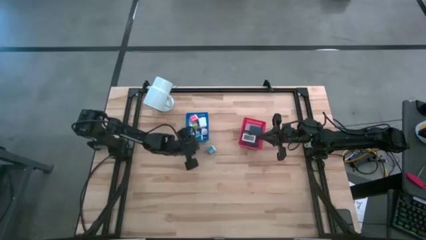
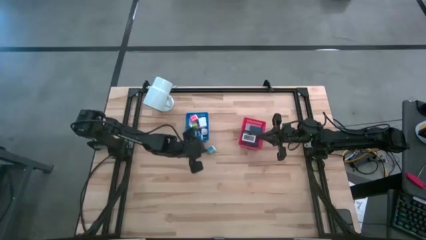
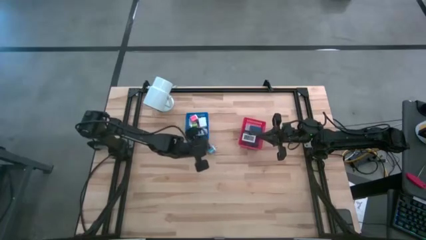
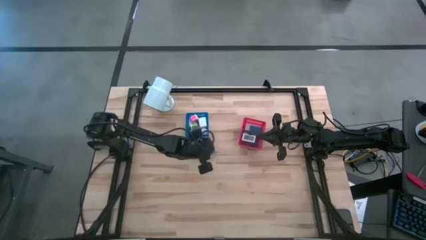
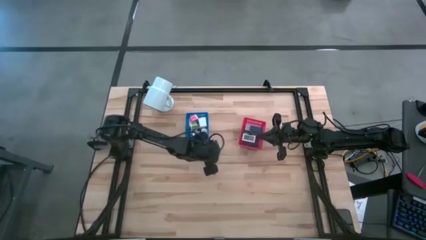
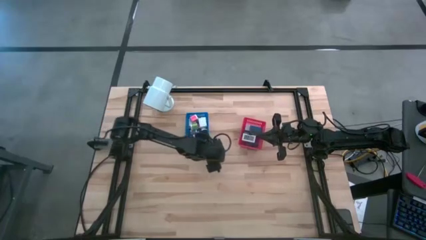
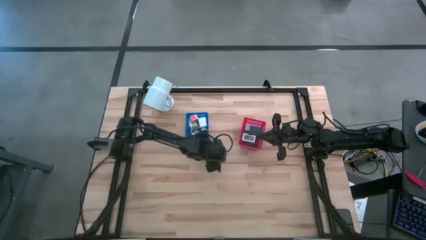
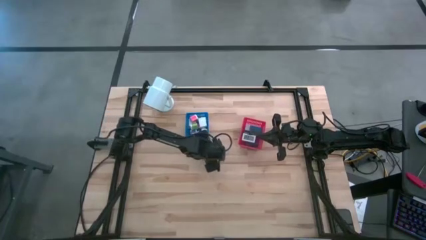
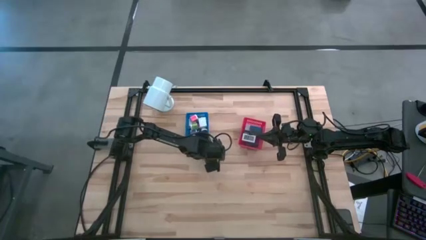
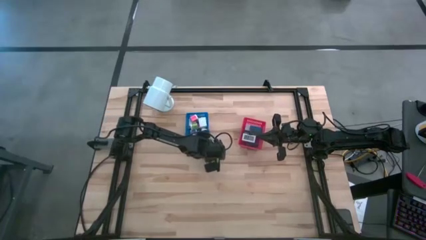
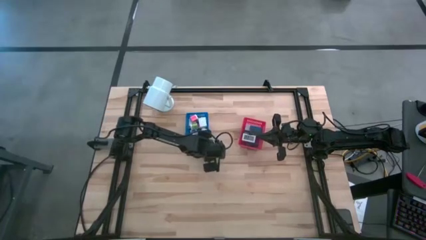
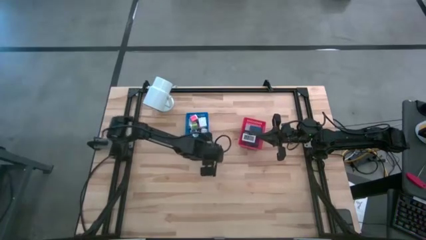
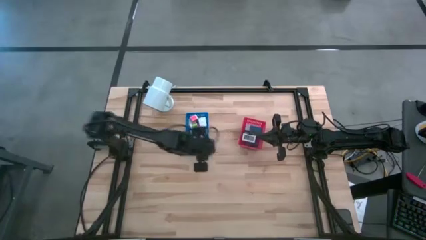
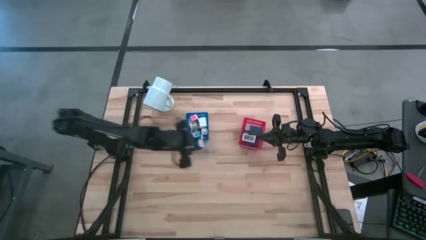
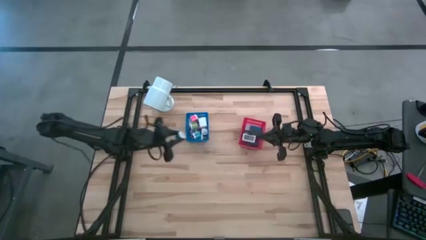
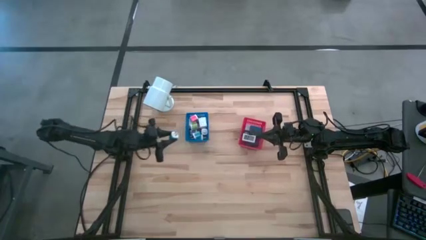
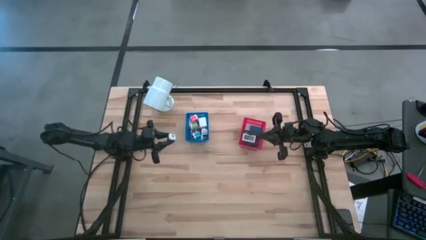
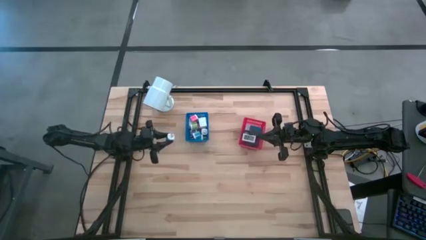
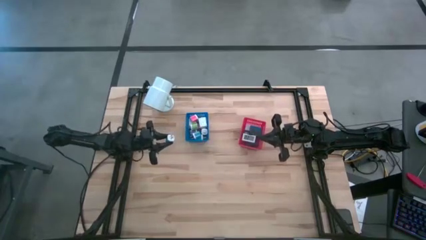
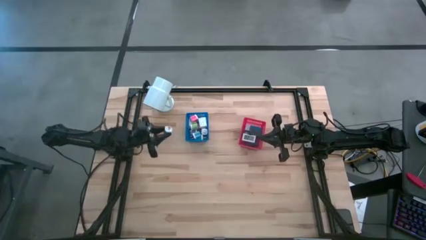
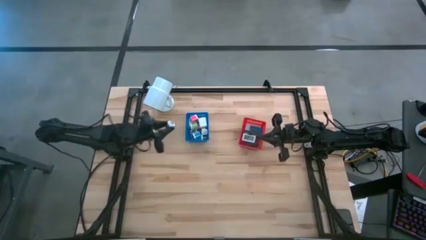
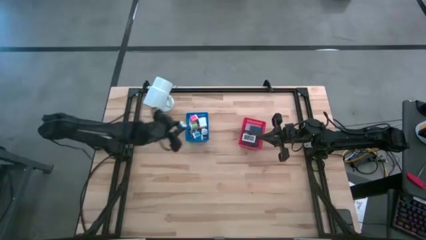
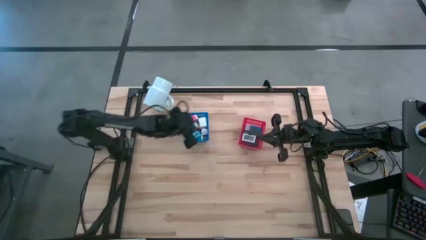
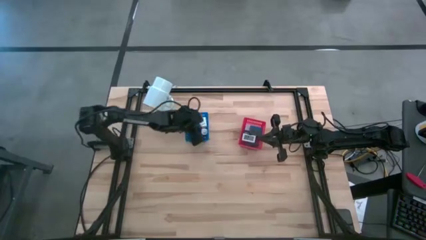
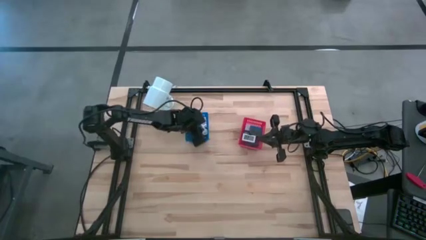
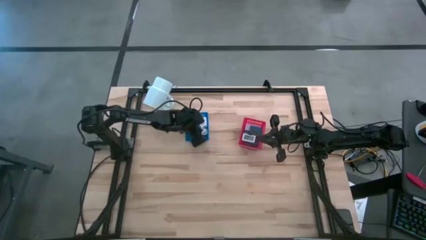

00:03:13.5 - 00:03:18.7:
Task: Pick & Place Office items
Put the blue charger adapter into the blue bin

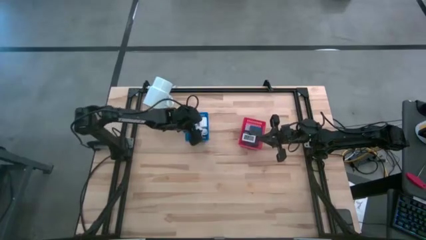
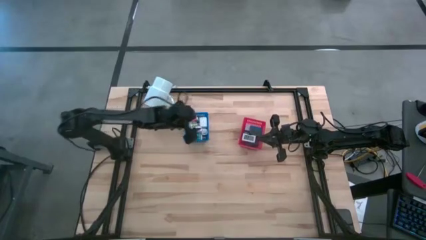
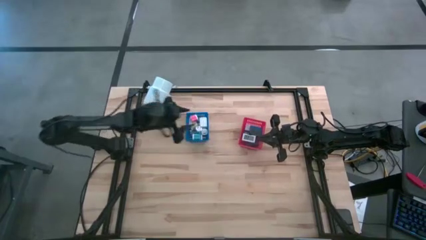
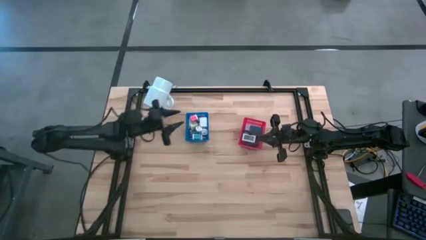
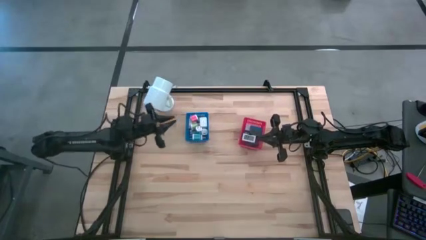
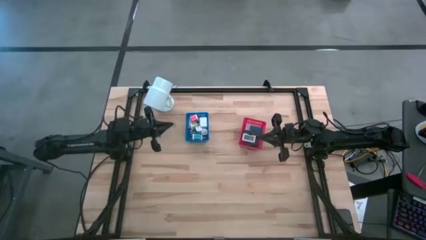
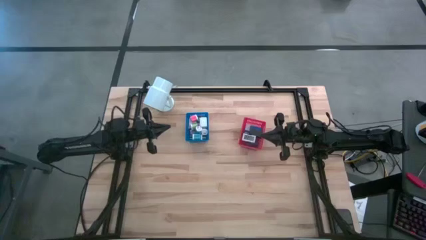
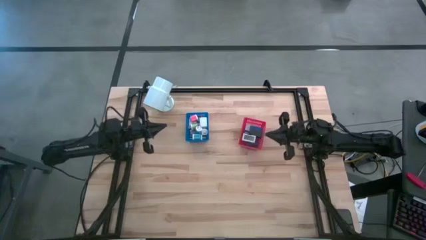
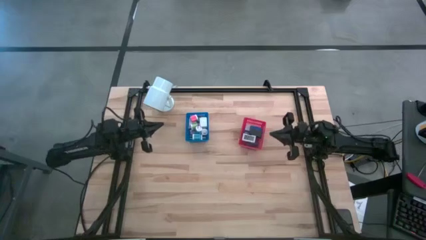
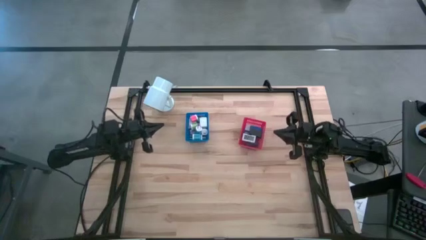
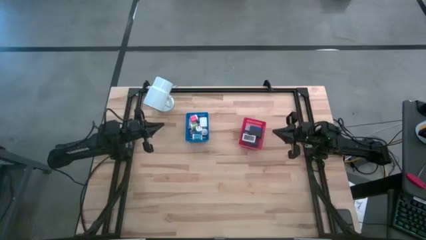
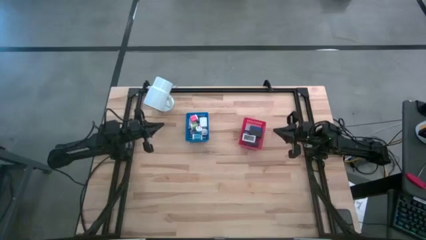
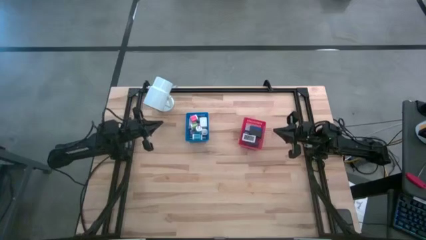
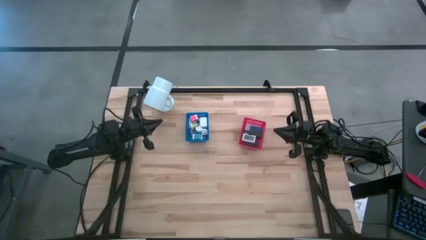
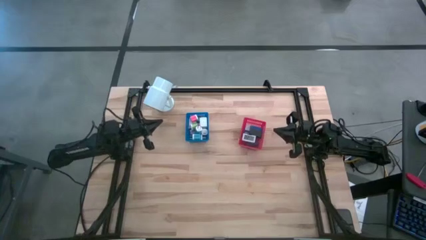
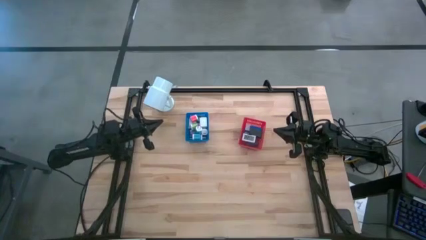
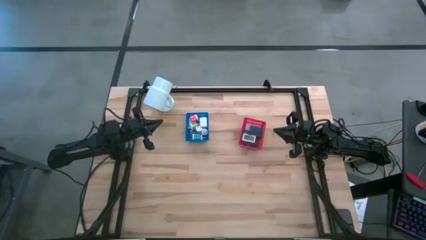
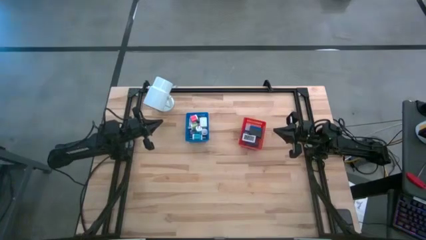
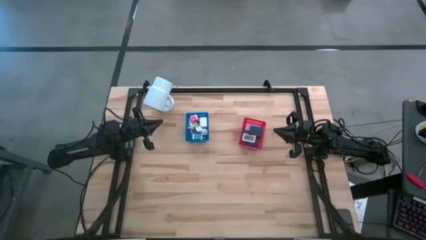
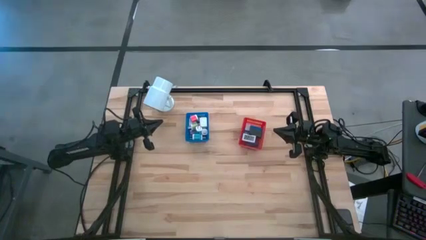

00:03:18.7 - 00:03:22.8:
Return to Home Position
